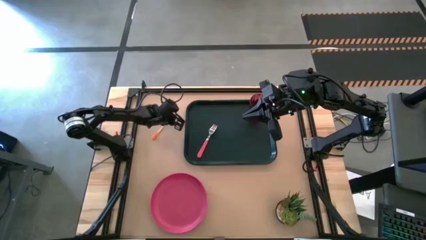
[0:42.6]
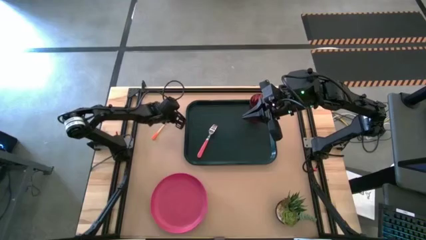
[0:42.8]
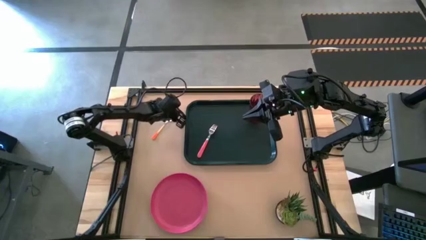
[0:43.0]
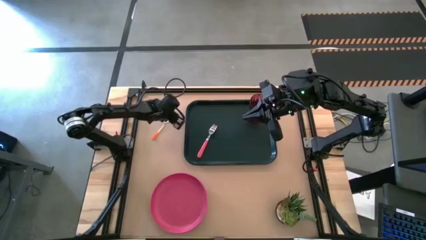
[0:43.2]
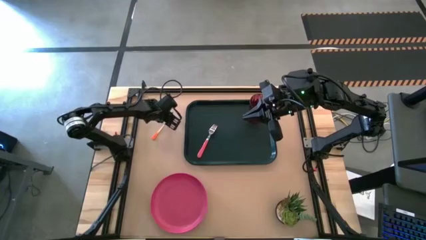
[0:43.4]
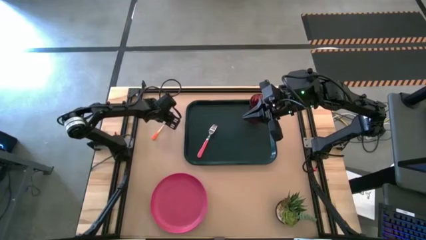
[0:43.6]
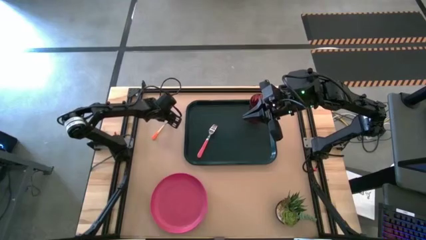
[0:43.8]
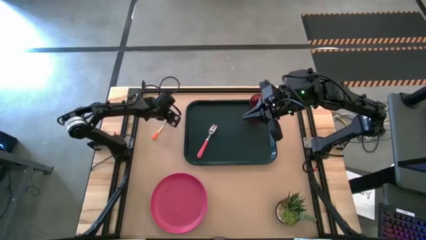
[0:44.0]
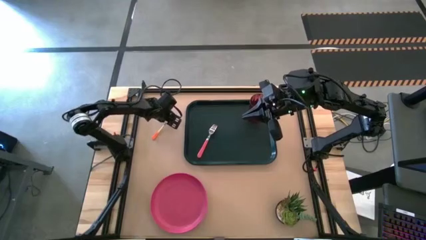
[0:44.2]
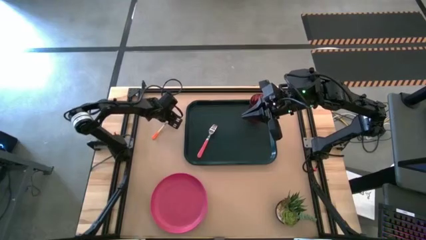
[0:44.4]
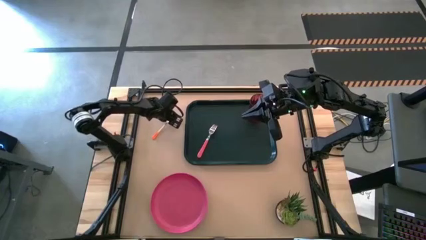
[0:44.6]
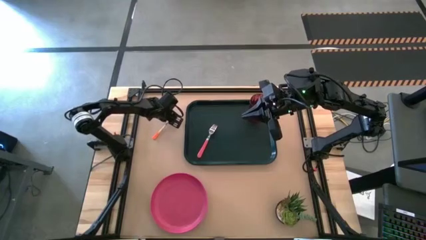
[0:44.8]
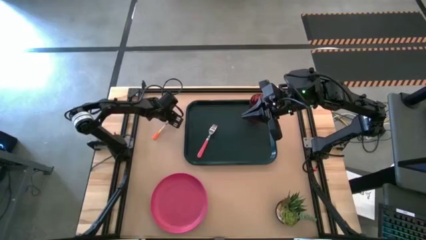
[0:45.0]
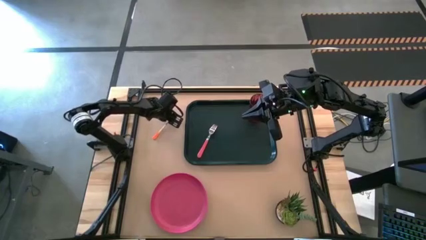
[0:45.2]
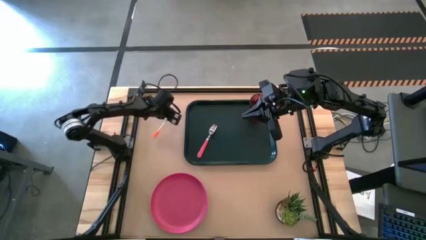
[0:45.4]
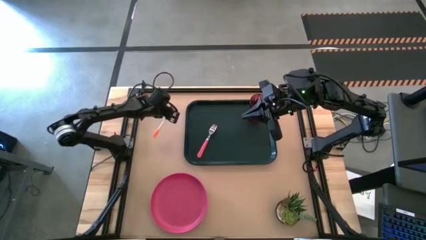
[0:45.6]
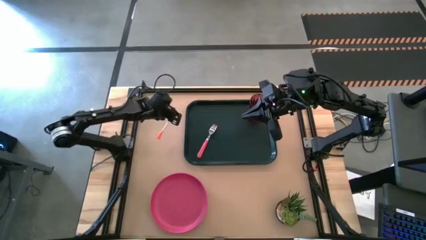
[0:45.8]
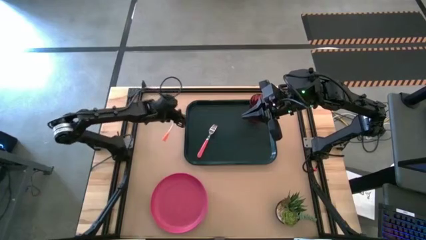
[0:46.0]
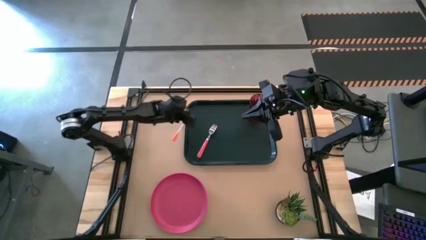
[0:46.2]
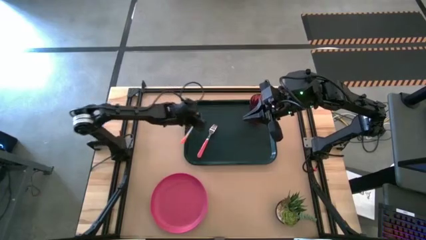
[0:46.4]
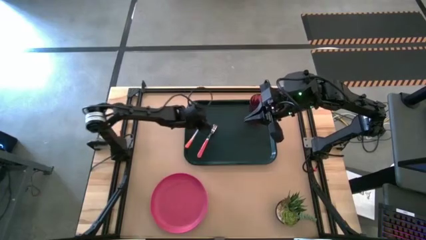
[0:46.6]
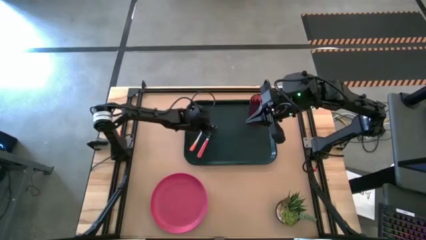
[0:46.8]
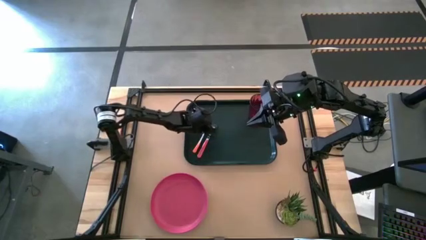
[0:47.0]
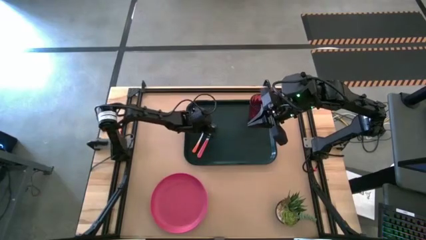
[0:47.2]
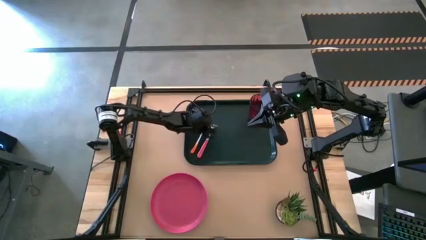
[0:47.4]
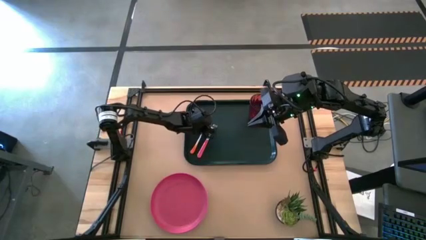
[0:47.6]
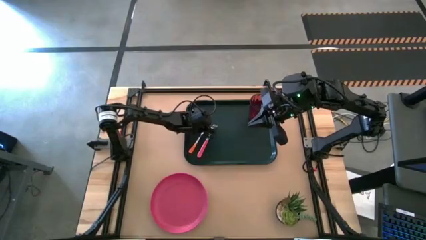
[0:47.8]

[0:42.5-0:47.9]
Task: Pick and place plate/cup/fork/spoon on tray
Put the orange spoon on the black serving tray to the left of the pink fork

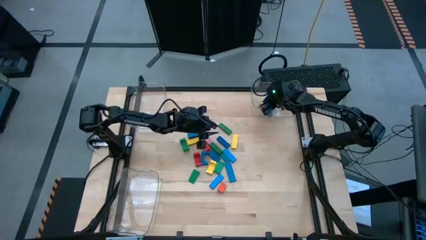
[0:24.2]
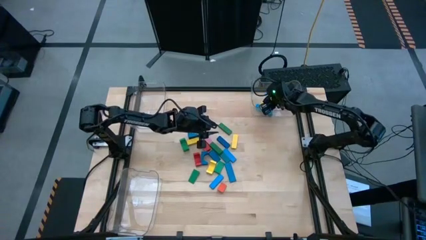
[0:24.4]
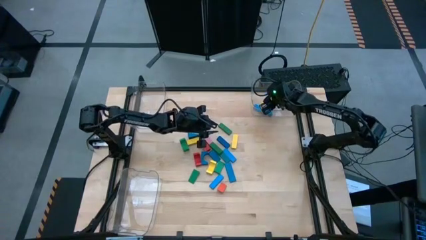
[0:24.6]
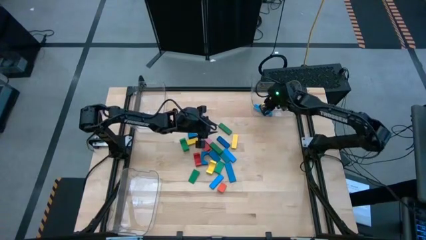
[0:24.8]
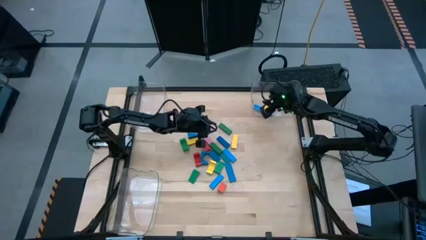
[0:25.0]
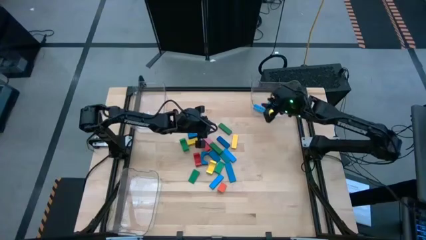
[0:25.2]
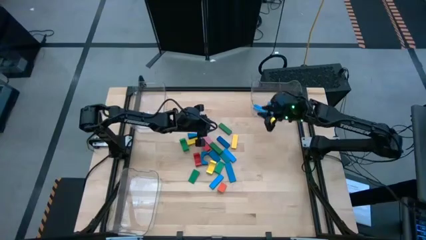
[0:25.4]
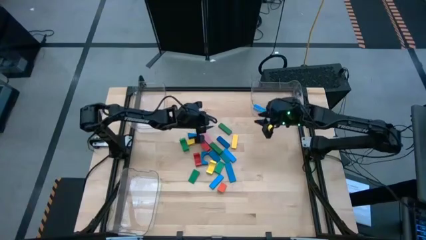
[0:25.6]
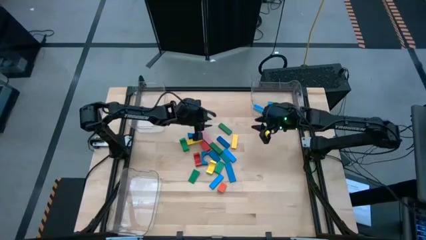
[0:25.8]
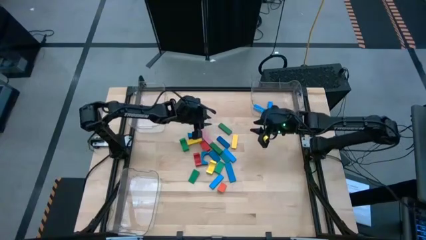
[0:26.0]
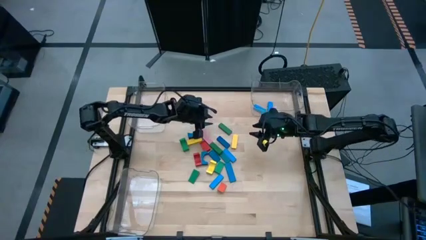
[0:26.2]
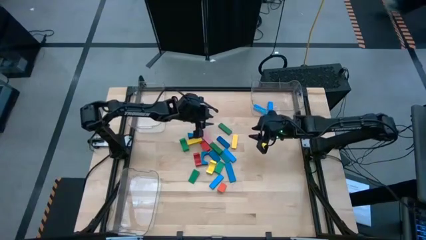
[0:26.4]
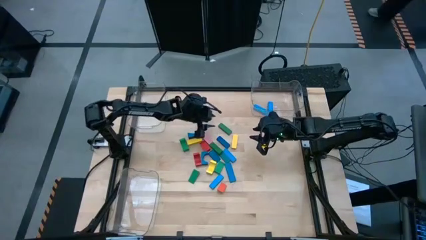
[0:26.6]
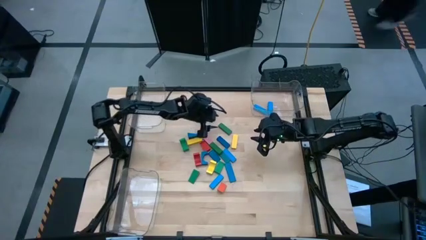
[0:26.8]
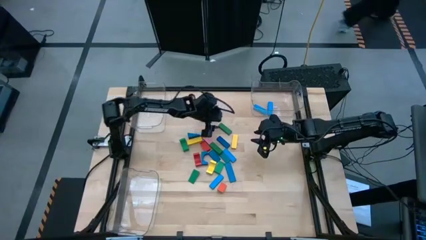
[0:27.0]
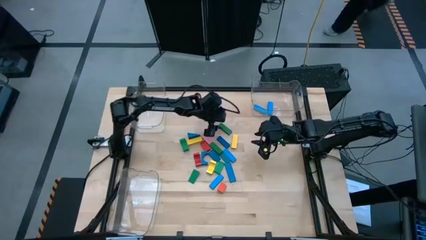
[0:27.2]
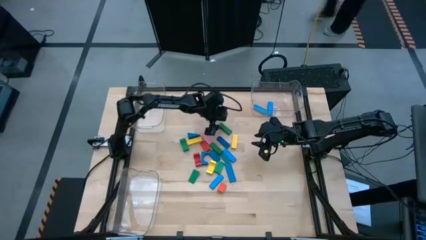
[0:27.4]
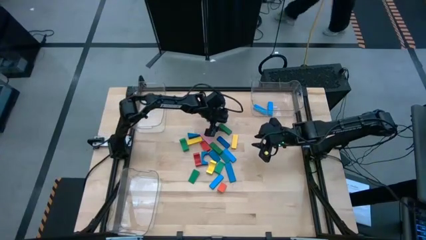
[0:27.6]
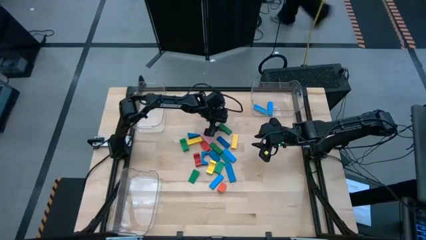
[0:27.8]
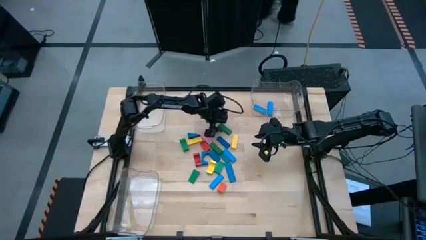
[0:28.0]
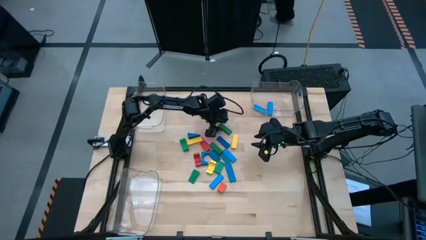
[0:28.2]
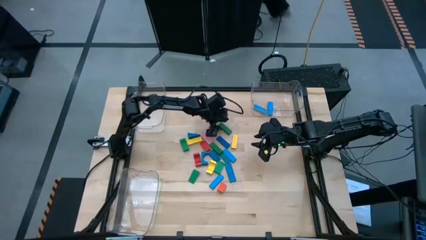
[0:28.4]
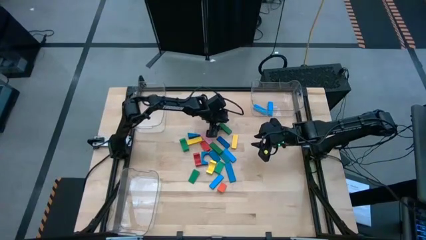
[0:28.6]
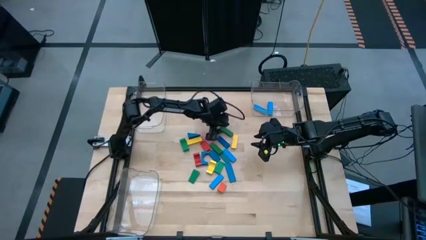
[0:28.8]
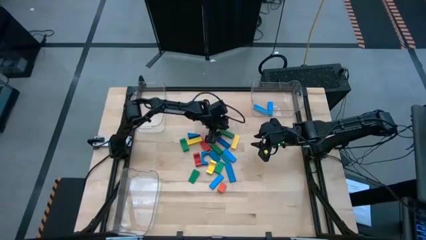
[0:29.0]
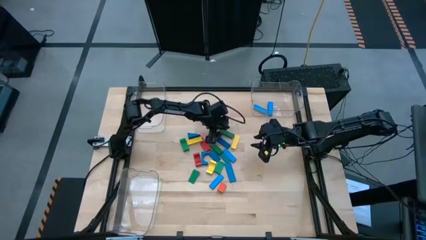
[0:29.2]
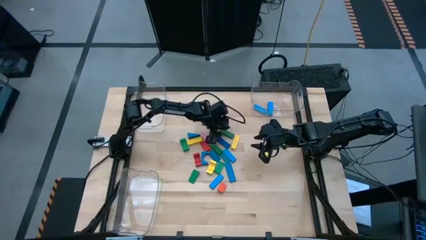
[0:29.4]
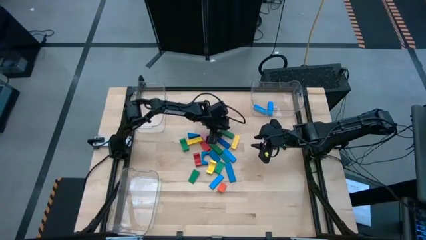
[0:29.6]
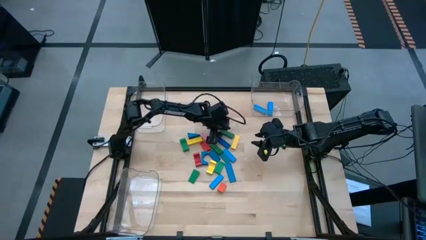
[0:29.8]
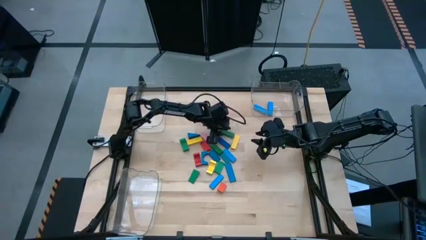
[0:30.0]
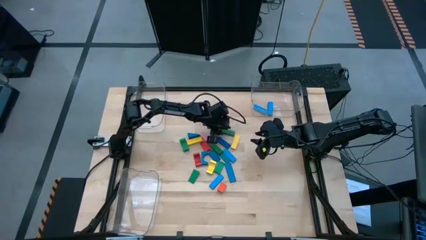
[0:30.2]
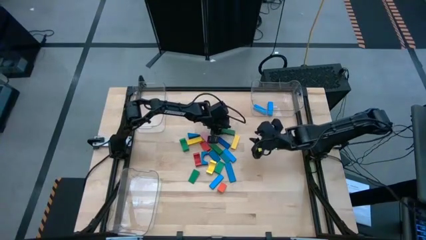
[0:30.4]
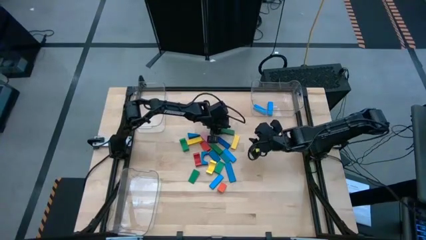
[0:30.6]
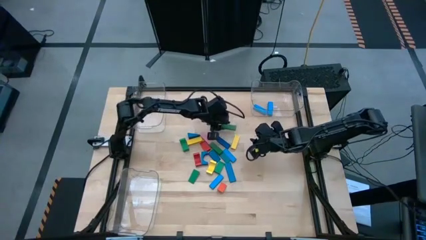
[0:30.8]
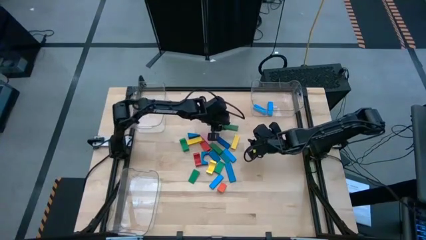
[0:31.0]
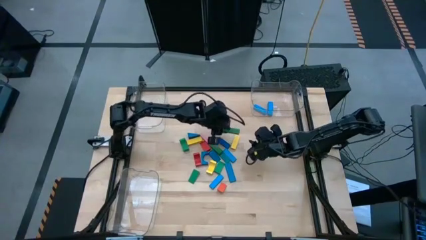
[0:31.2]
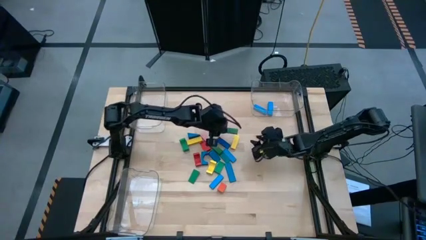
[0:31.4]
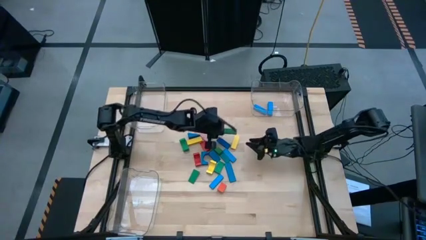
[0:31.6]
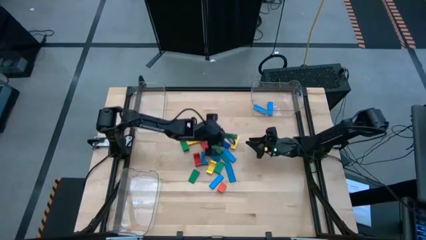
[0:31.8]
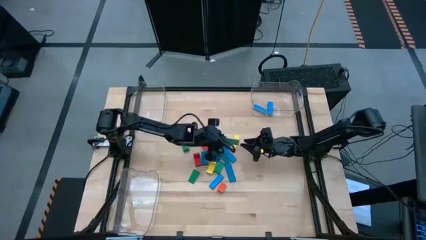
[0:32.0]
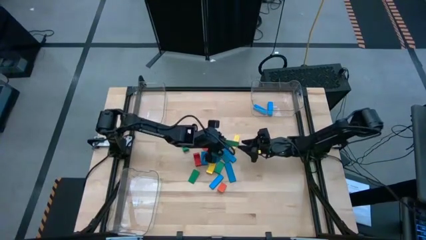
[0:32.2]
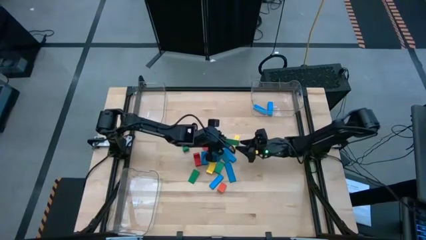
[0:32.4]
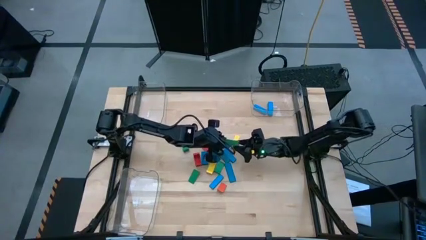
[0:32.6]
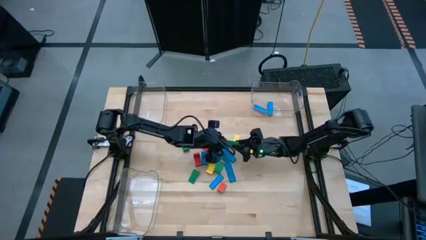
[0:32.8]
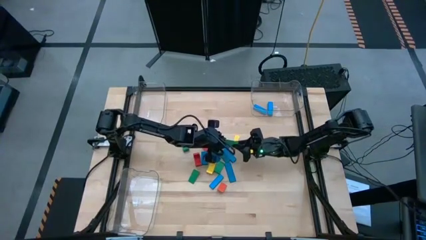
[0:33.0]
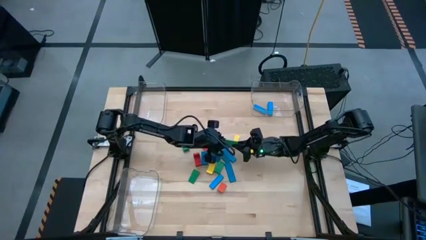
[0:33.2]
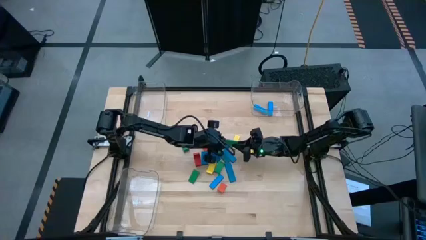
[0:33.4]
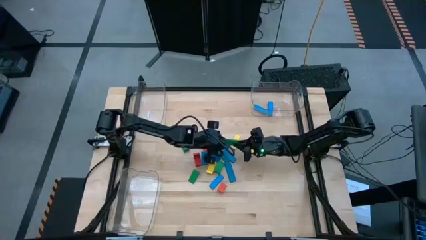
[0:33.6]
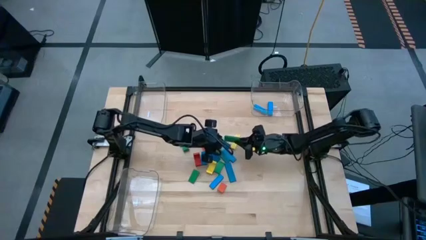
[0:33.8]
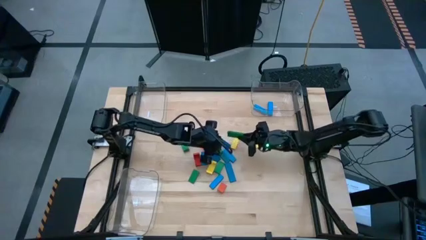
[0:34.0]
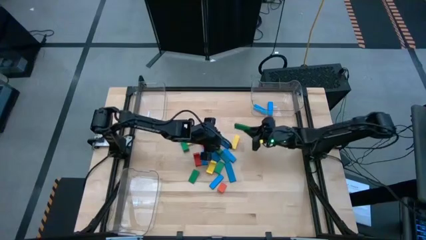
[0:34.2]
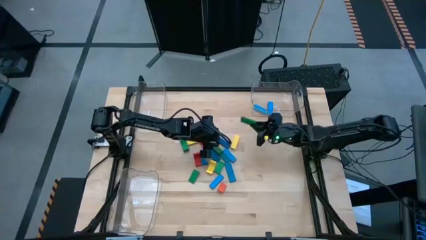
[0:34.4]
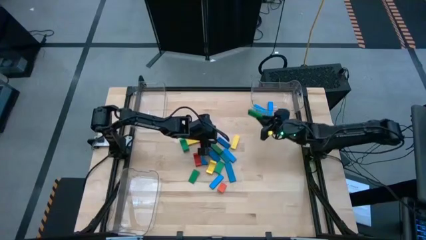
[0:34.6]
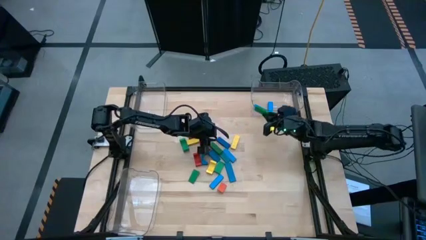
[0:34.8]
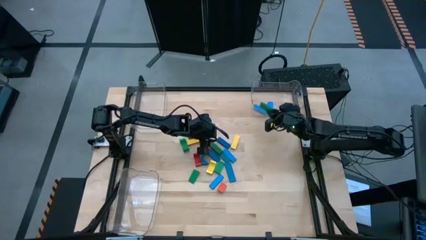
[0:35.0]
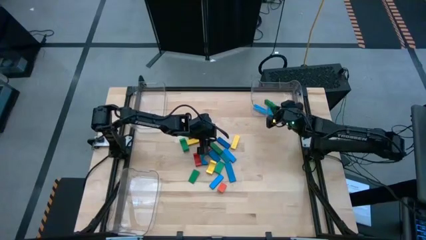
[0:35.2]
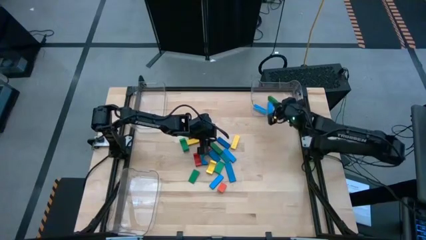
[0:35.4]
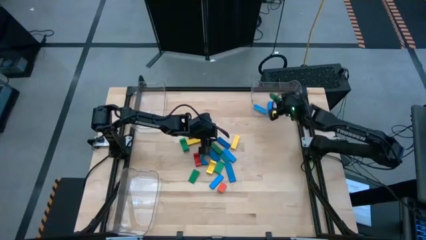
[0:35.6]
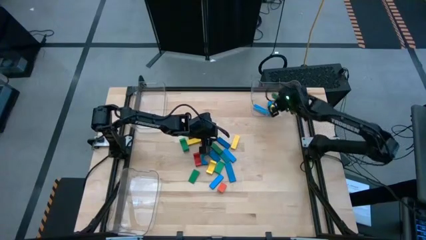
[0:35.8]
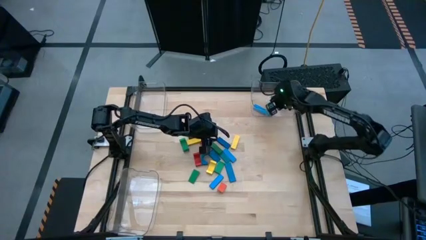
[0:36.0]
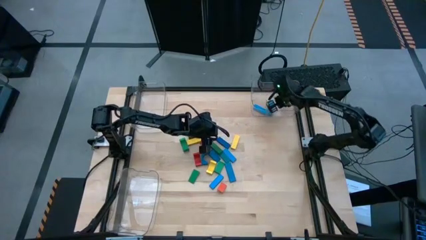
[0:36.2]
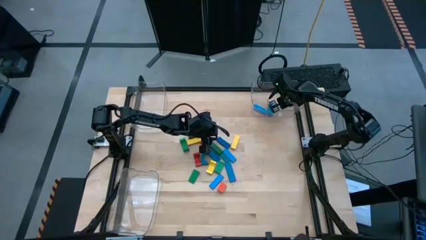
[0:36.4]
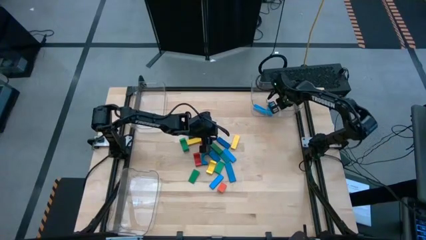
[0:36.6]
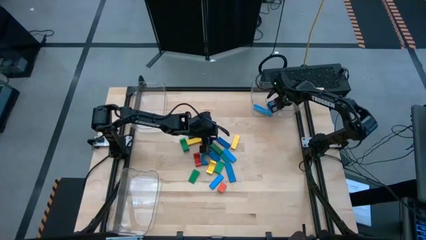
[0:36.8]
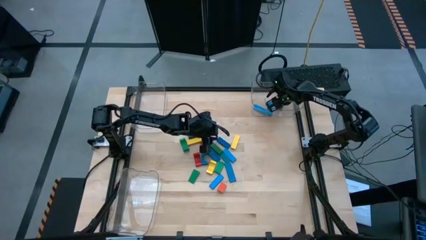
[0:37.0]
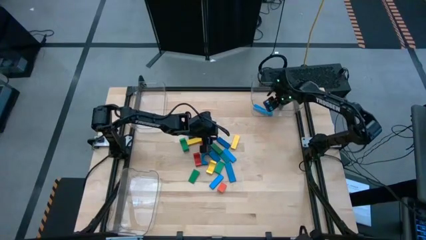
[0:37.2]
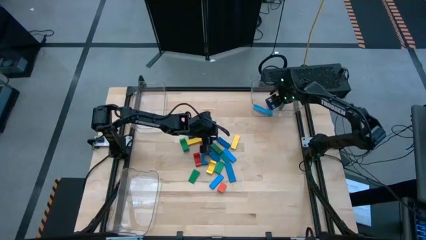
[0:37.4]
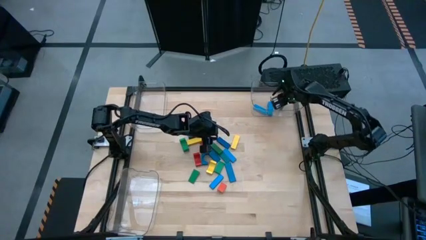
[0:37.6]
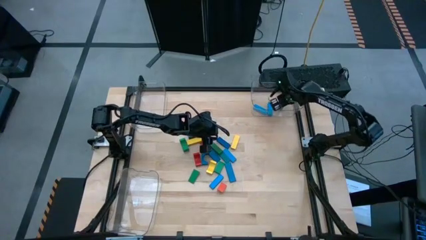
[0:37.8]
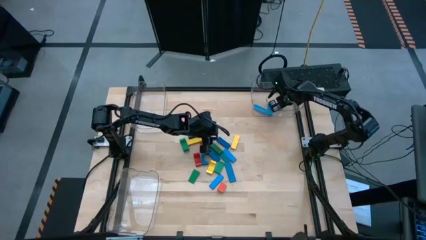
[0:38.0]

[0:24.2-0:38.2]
Task: Sort blocks by size
Put the green rectangular block into the top right transparent bin
